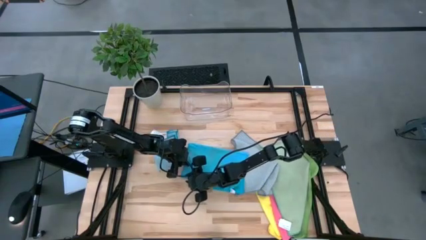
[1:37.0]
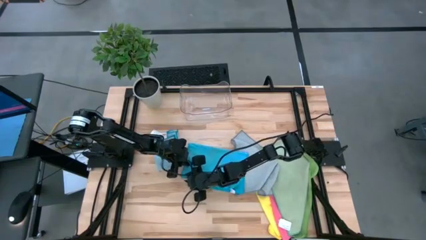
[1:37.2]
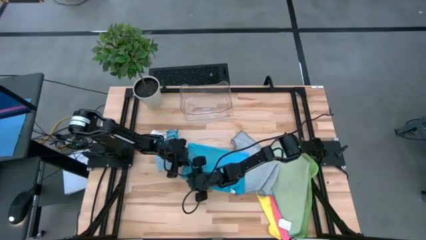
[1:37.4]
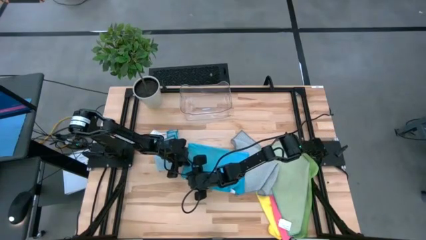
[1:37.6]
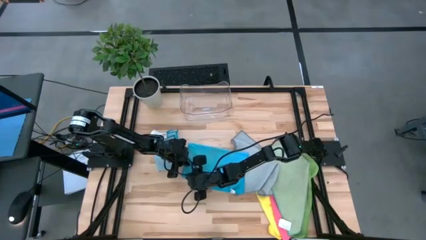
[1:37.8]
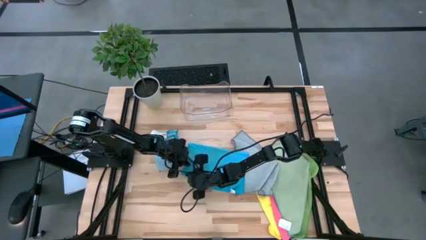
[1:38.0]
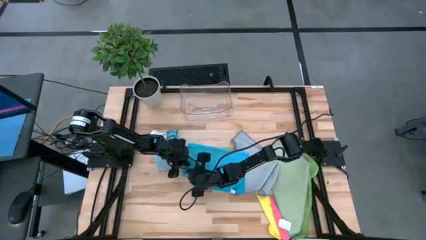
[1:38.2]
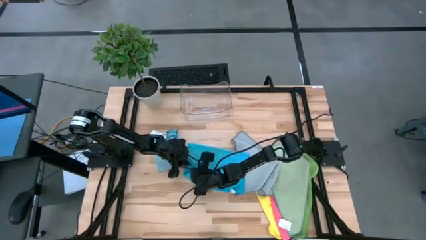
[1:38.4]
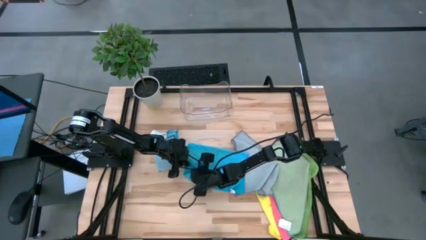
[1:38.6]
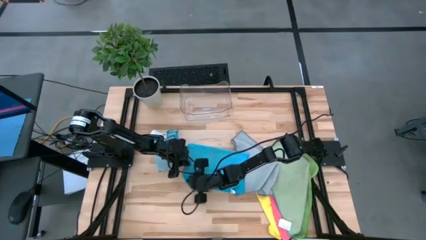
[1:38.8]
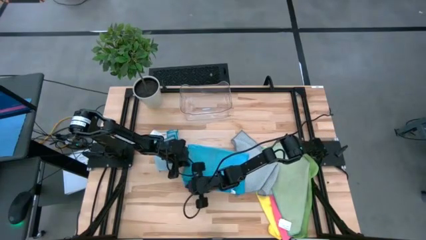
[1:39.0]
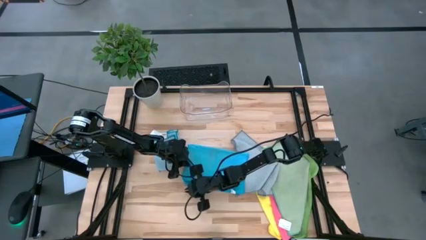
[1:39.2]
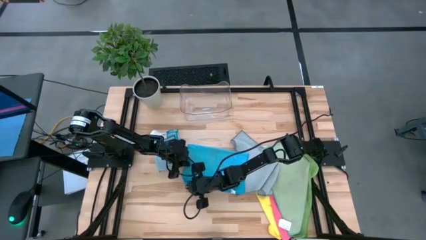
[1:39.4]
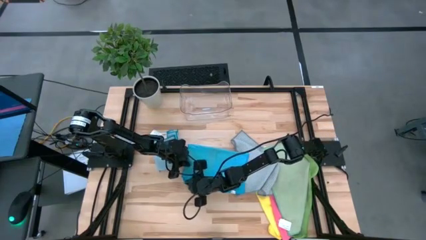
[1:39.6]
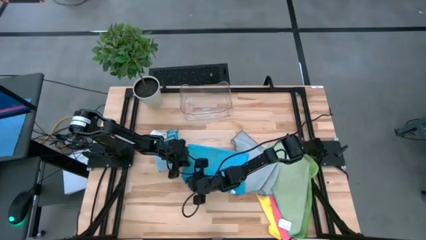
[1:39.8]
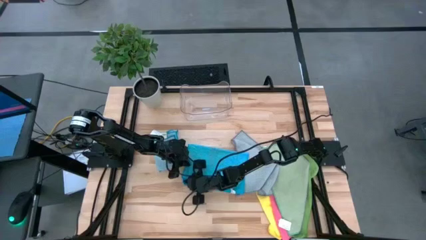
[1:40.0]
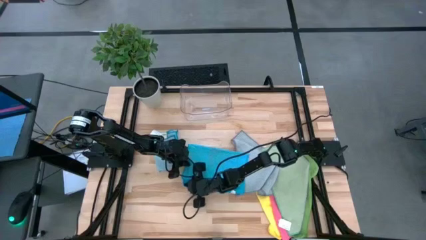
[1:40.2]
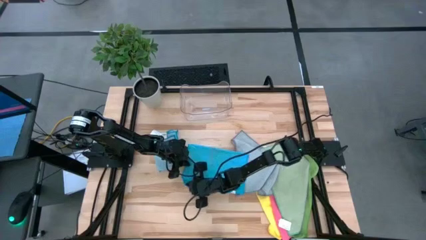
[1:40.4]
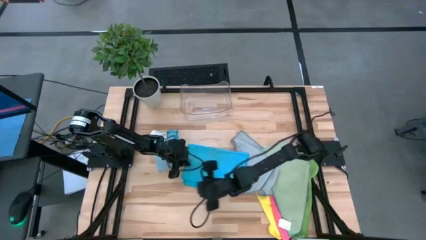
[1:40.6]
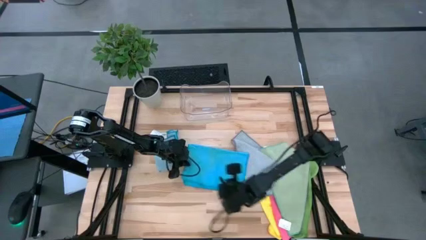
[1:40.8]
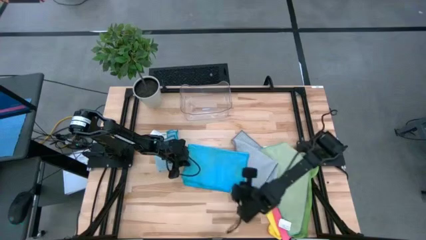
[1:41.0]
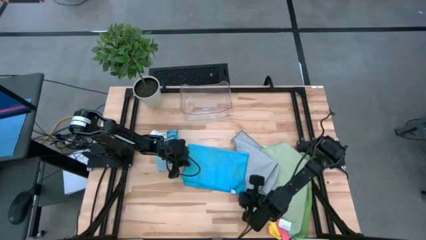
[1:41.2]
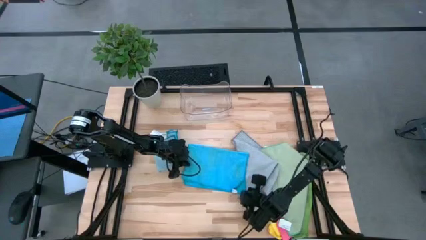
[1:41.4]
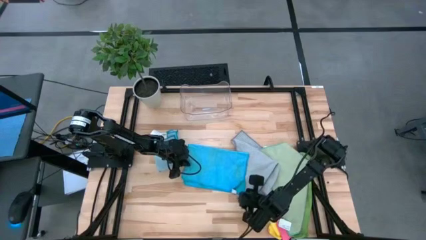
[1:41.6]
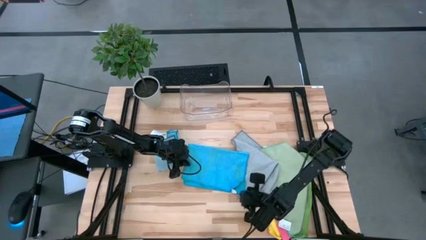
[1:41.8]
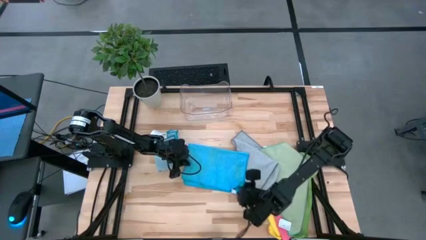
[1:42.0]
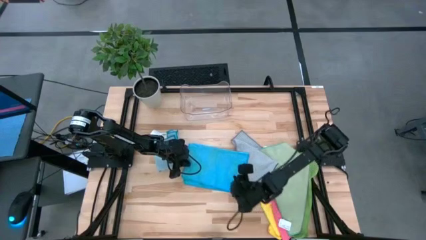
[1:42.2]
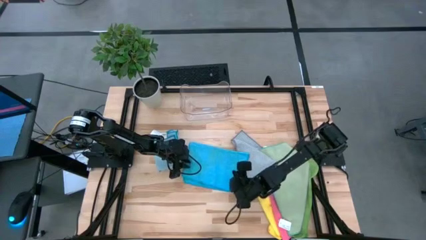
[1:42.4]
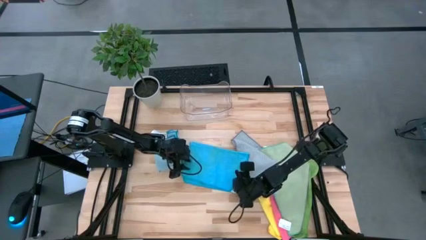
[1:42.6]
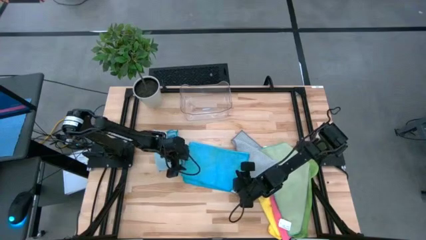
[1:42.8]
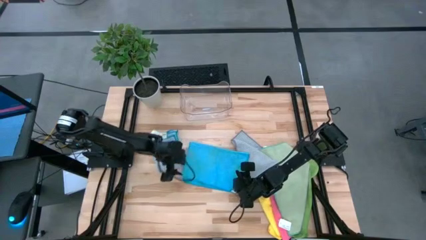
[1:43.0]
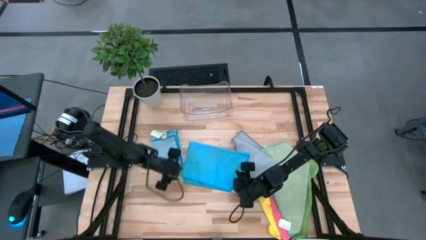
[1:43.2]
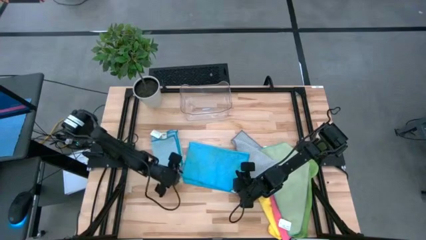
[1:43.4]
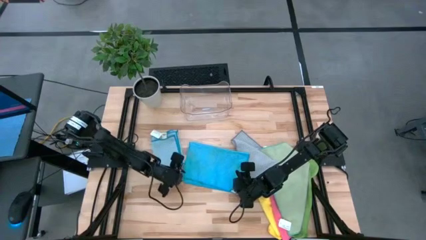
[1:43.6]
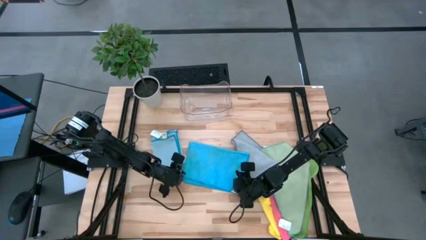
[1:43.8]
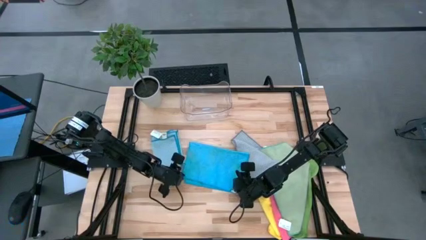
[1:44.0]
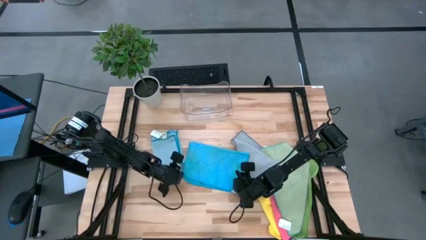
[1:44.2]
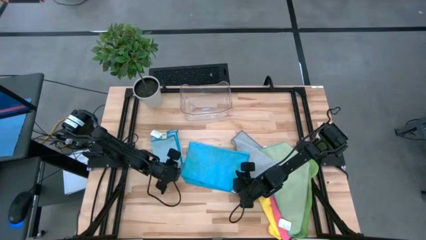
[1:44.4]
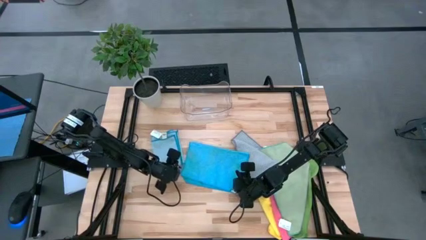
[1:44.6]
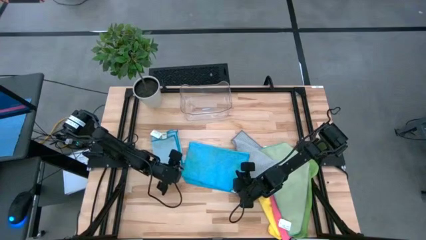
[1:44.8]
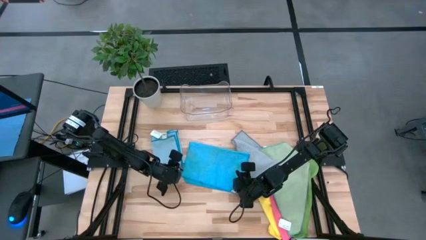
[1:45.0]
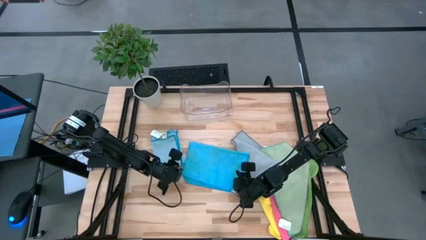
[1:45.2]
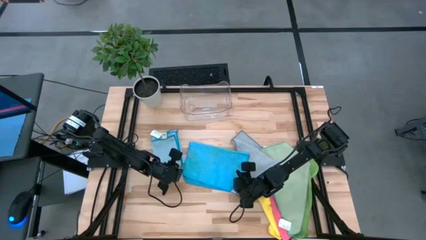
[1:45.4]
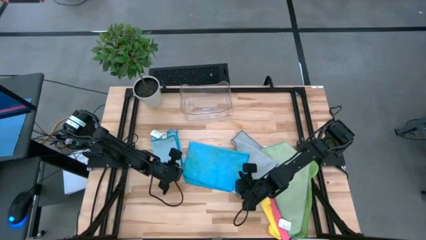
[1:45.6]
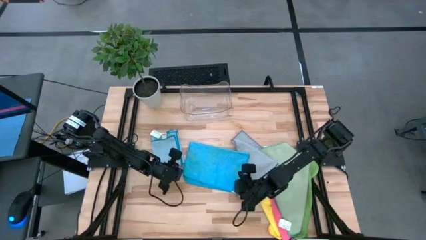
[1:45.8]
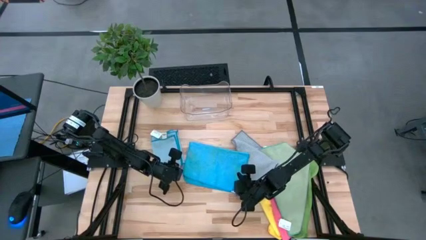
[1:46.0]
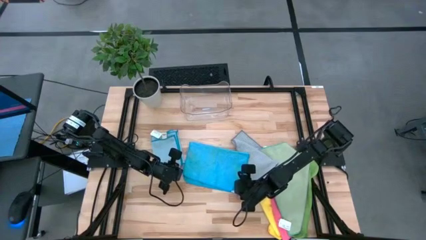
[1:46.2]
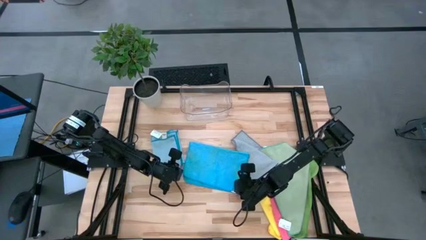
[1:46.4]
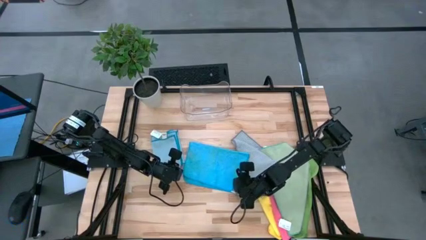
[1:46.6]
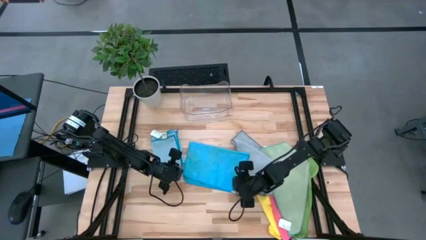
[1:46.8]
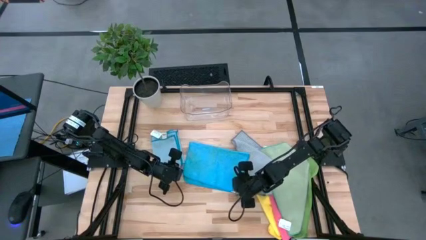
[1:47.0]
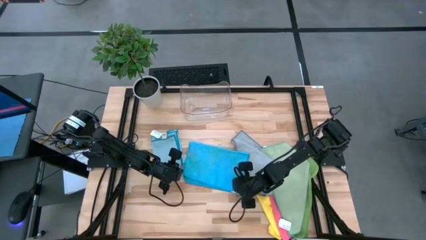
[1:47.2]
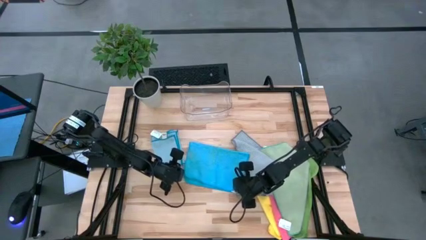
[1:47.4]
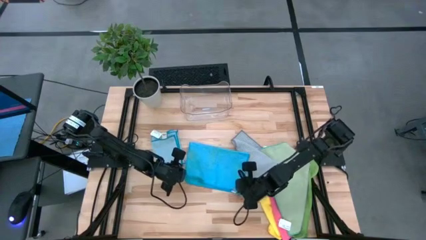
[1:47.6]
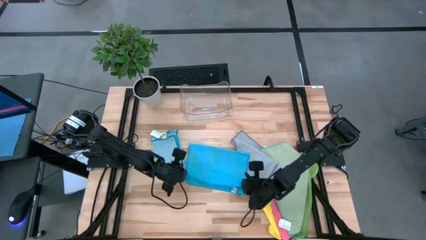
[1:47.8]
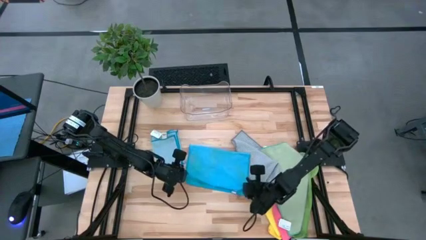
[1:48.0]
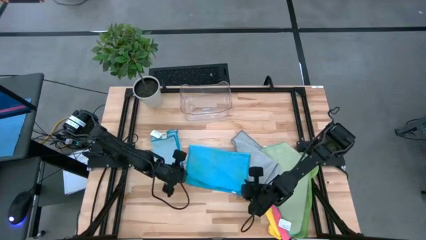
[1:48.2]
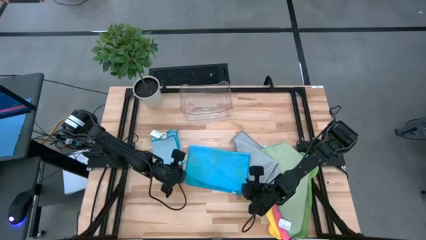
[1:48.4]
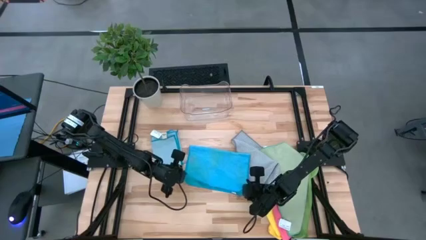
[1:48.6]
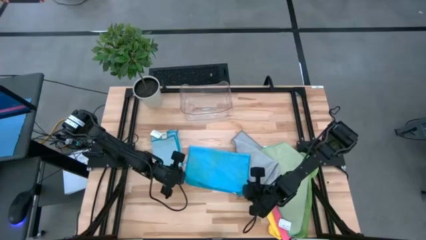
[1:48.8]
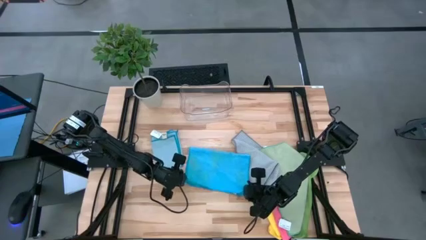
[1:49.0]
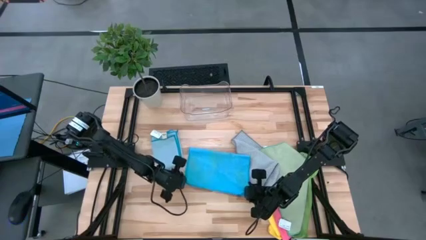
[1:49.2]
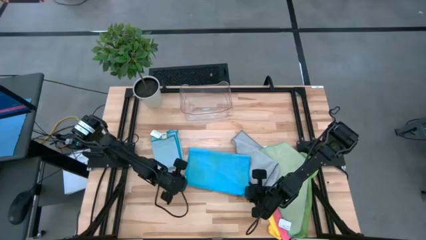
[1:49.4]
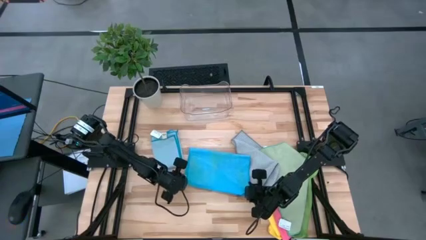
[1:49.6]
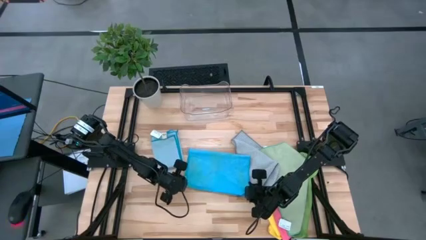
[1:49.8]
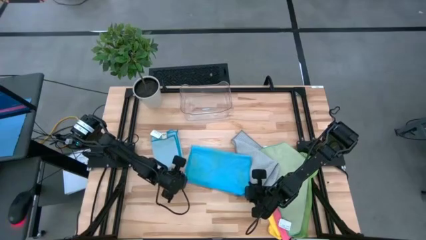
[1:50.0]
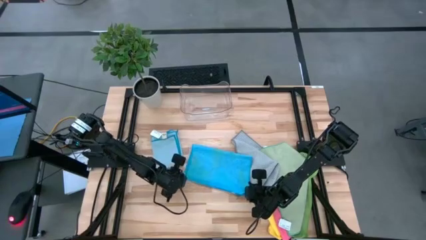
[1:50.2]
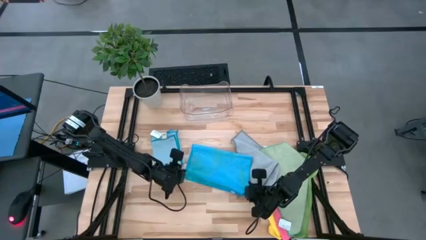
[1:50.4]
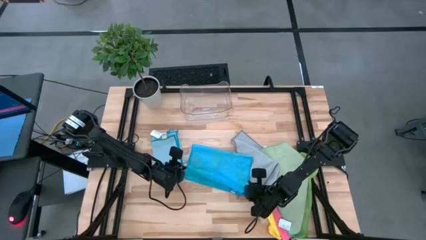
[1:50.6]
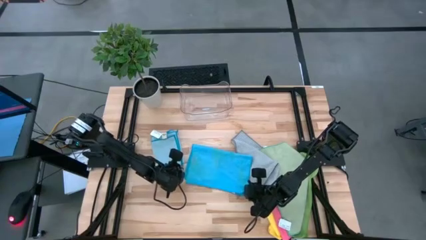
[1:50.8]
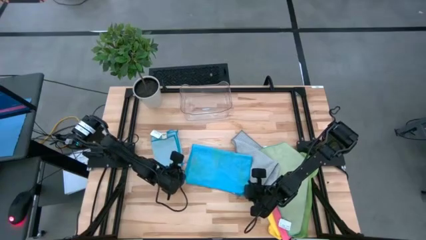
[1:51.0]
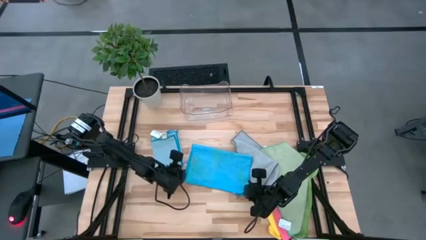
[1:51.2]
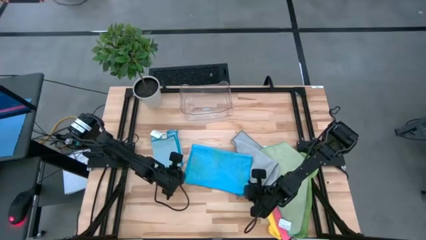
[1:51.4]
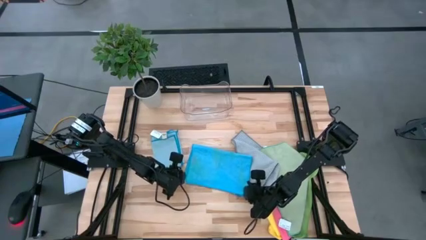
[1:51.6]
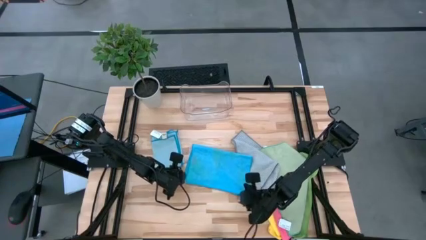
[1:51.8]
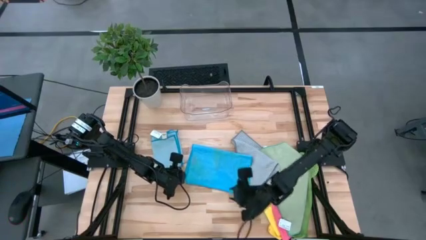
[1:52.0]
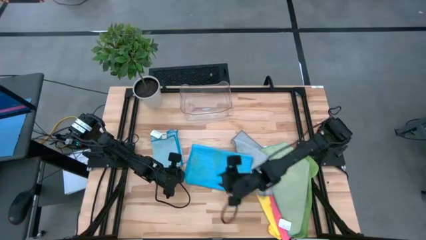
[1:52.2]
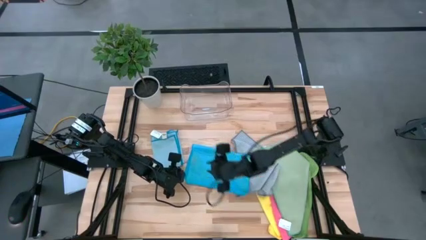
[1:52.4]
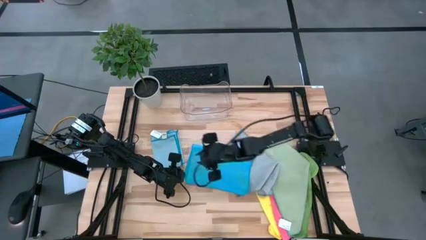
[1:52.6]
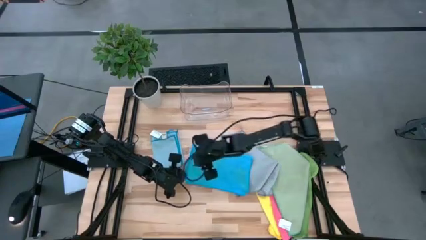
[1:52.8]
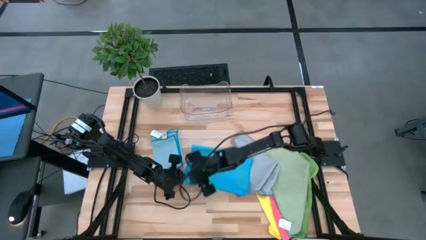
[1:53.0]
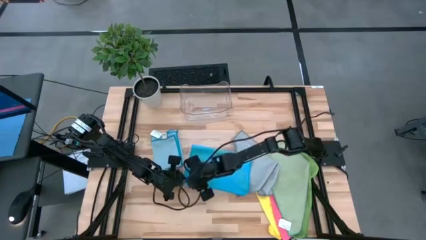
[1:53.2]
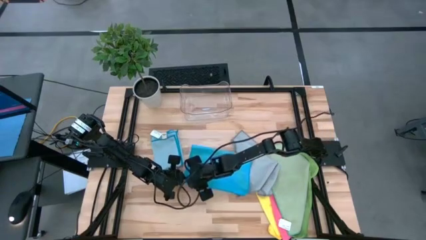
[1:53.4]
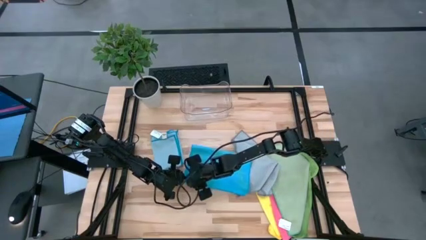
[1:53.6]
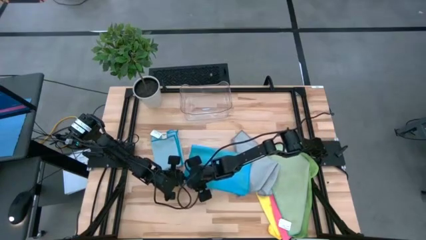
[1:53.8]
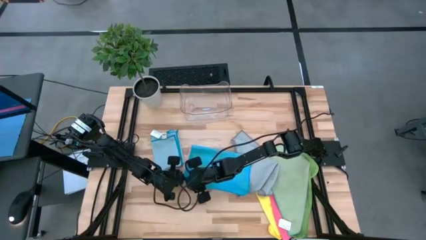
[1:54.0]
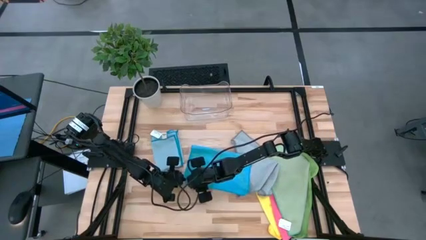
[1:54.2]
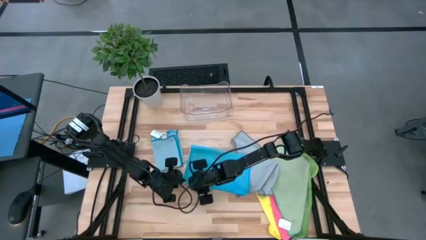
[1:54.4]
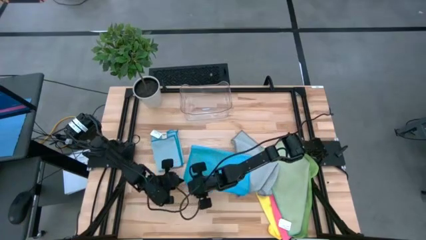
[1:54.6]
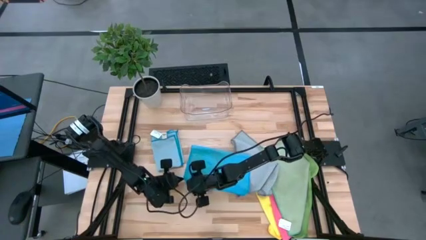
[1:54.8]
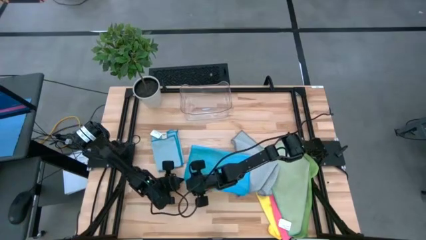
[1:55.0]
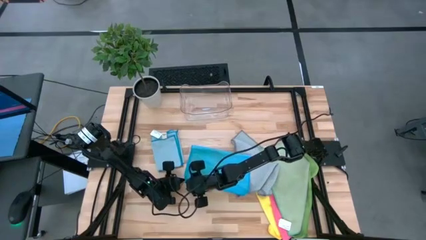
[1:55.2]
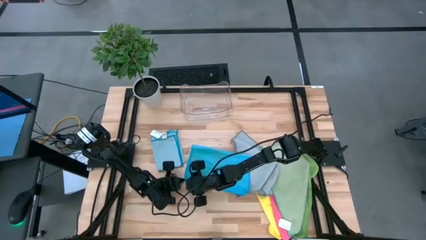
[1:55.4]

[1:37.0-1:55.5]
Task: Fold microfiber towels
Fold the blue microfiber cloth
